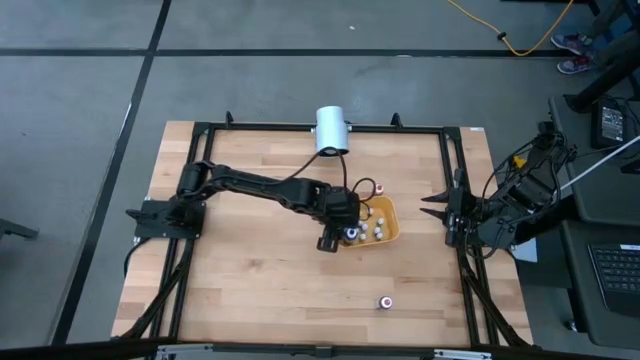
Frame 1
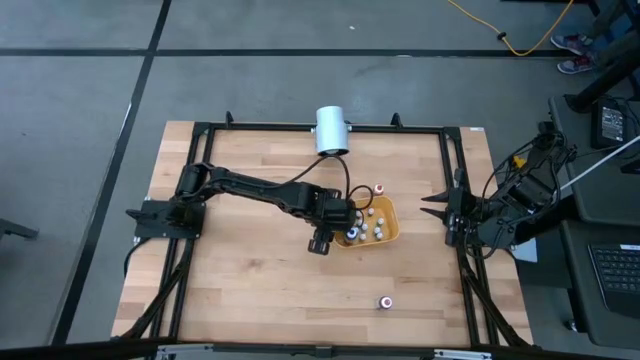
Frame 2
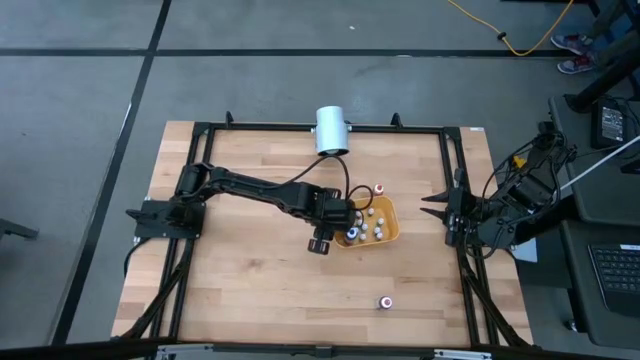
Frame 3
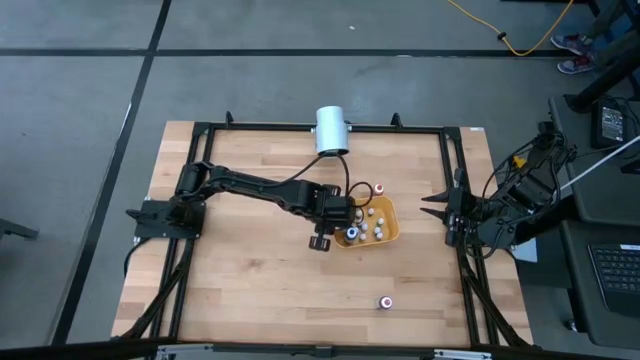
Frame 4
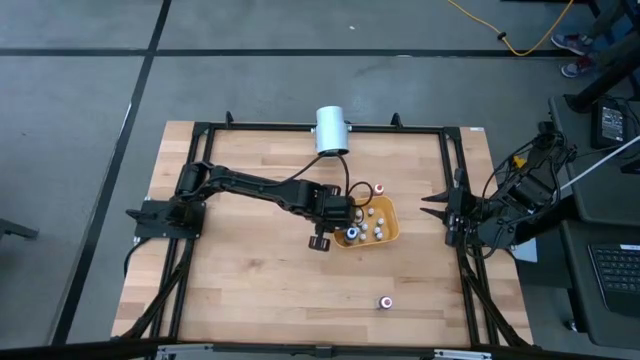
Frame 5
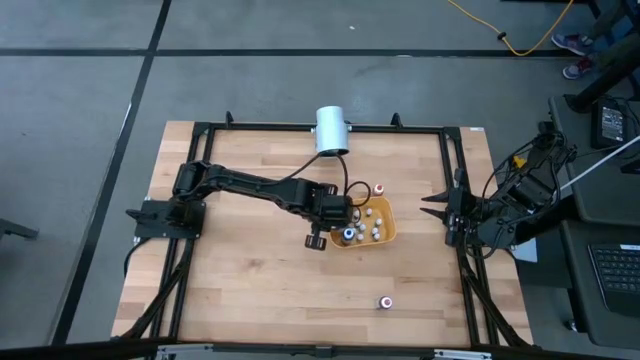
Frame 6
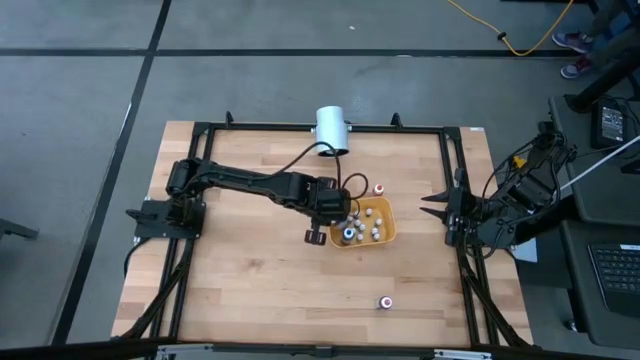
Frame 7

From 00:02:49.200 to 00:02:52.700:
Task: Pick & Place food coloring
Adjust the large purple food coloring bottle in the yellow bin

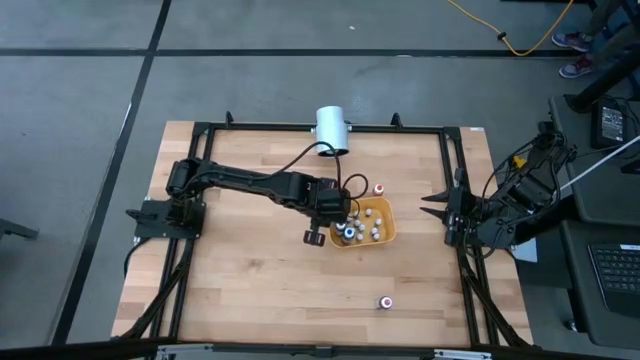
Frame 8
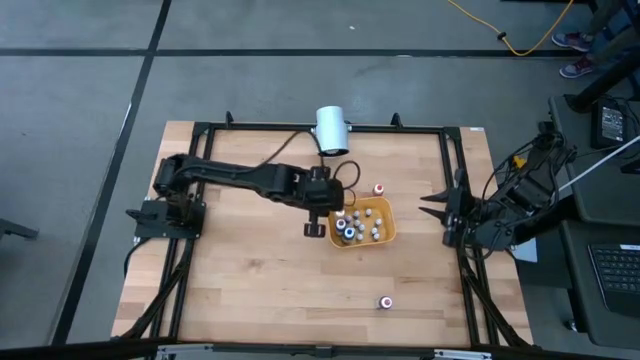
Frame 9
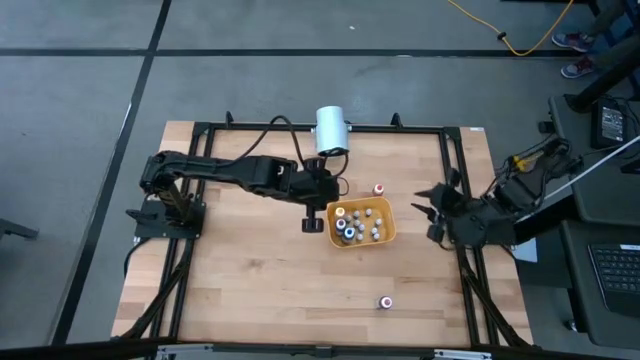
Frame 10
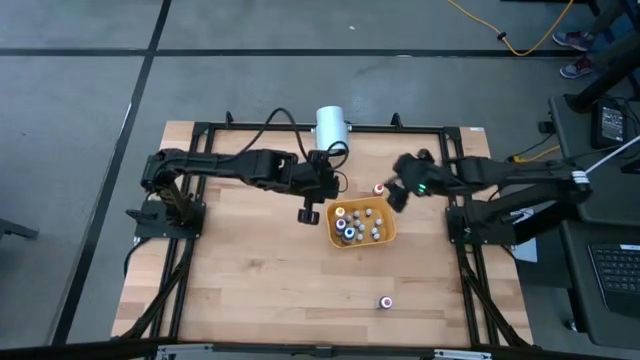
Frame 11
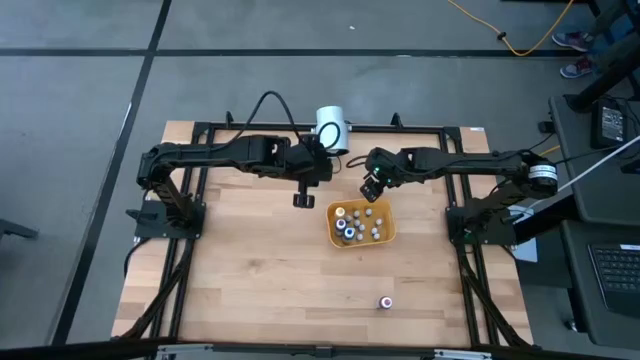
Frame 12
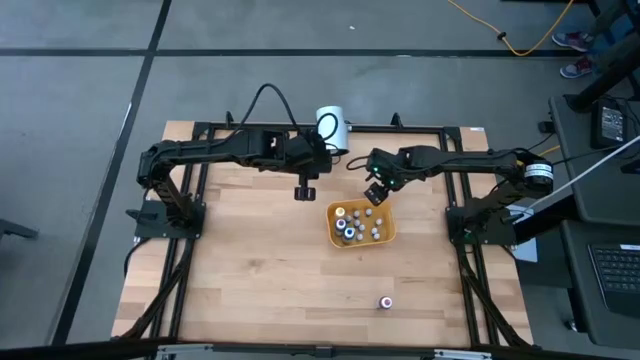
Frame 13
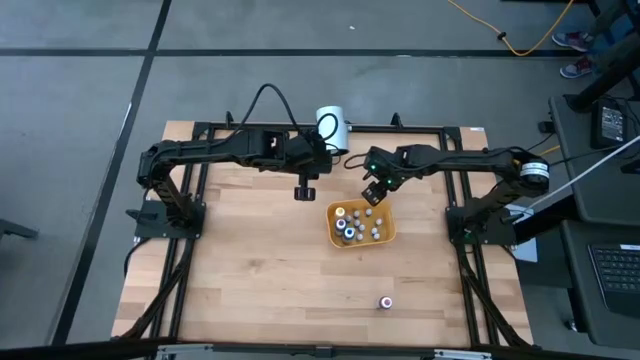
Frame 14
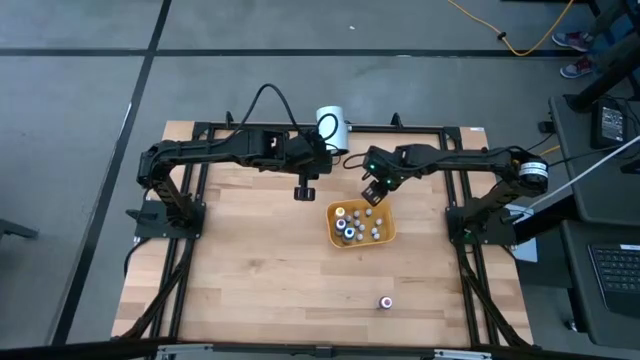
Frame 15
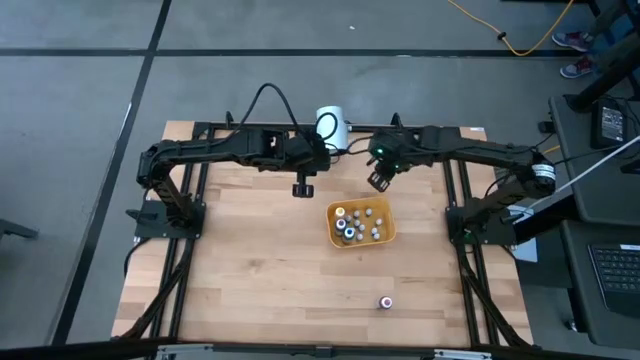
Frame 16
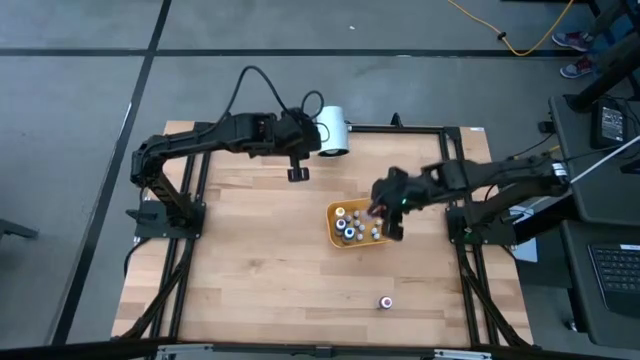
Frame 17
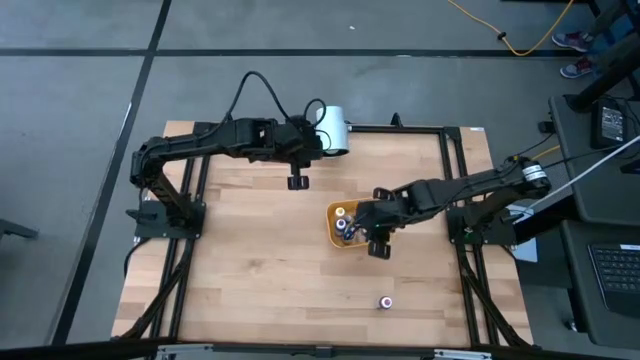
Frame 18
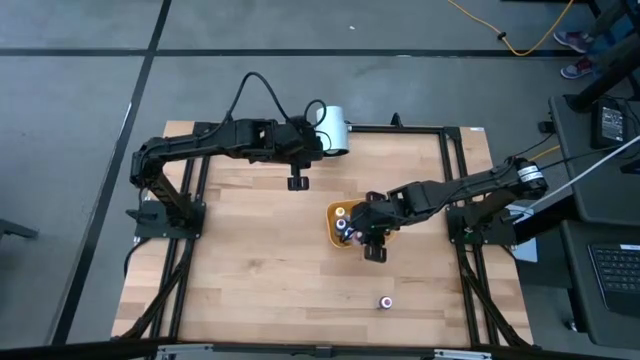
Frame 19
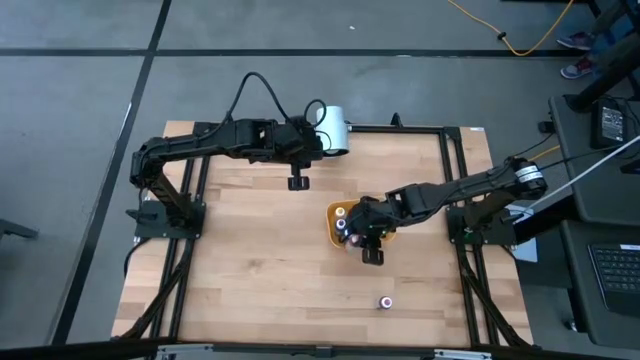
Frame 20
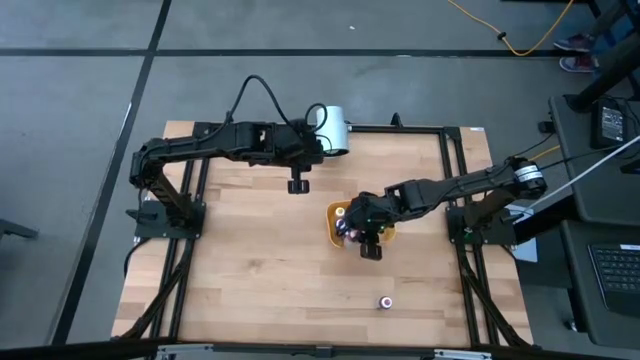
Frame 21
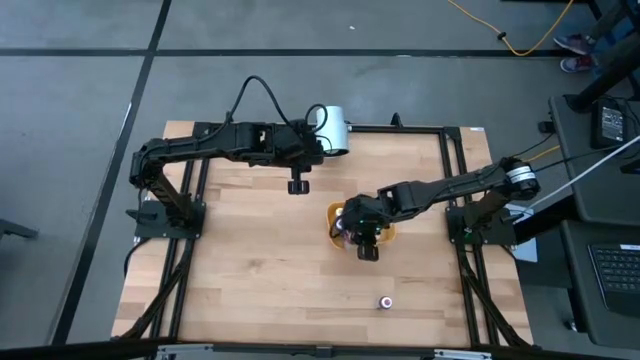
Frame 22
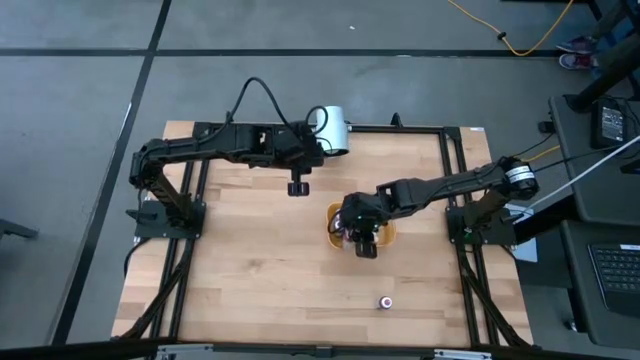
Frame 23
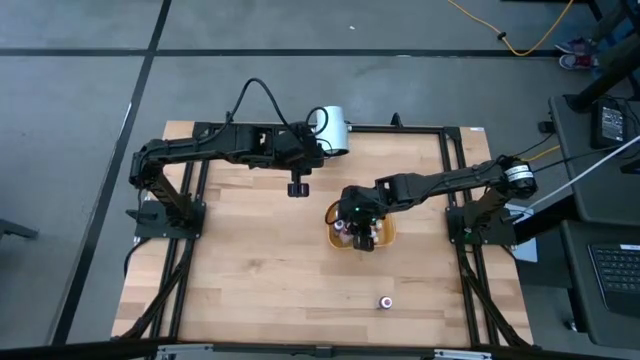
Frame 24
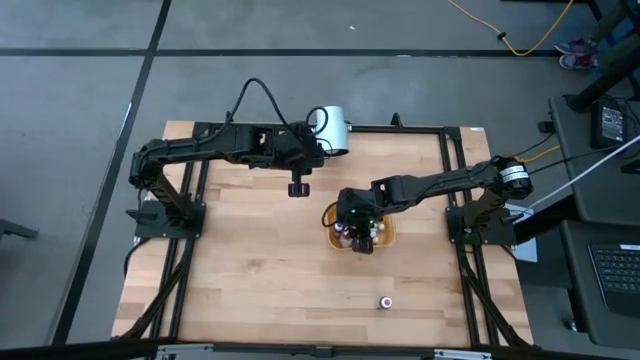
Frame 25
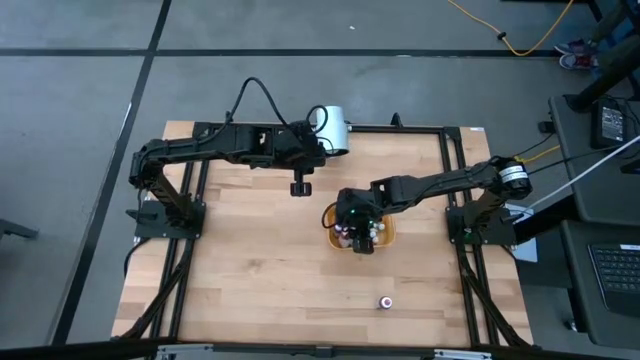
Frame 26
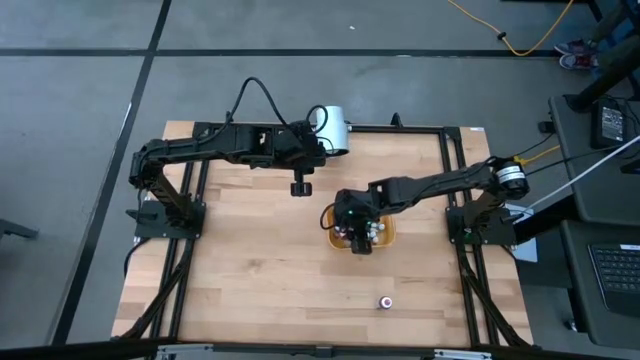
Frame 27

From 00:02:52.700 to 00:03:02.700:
Put the large orange food coloring bottle into the yellow bin

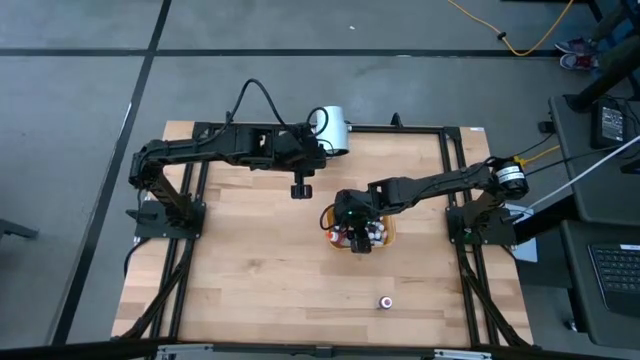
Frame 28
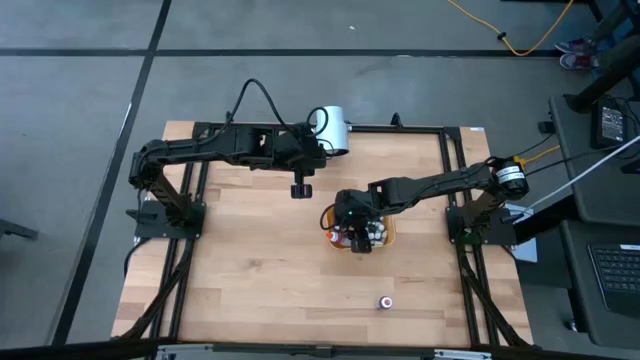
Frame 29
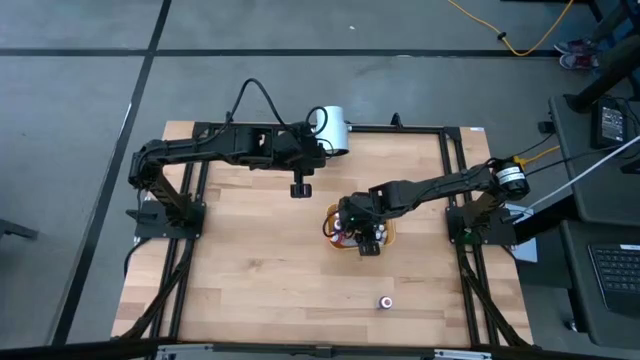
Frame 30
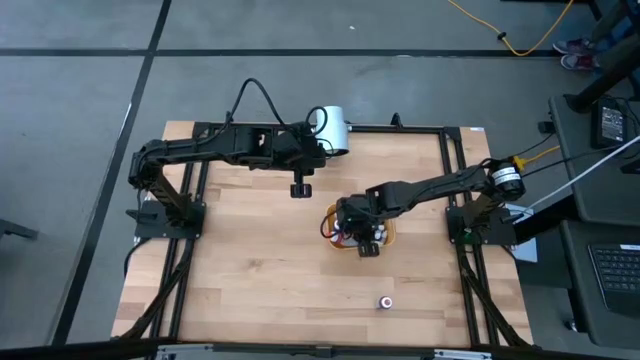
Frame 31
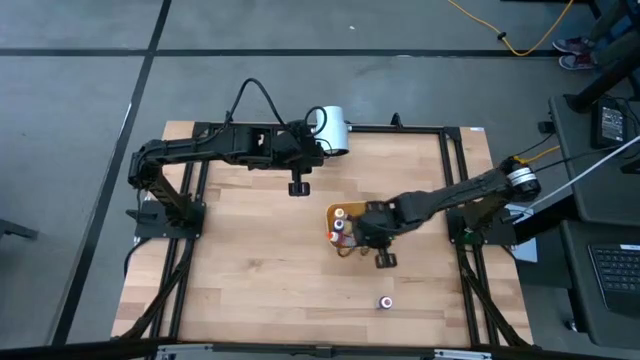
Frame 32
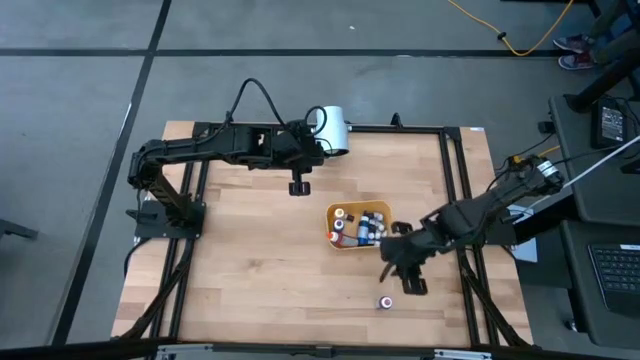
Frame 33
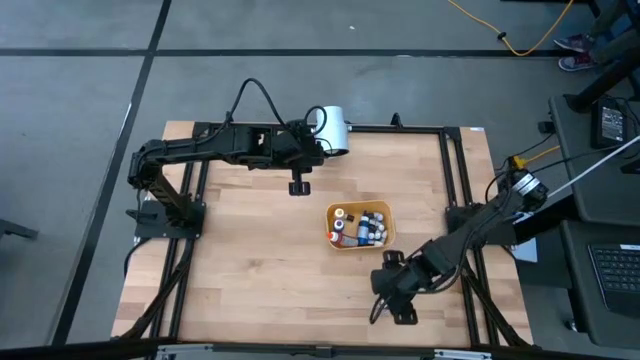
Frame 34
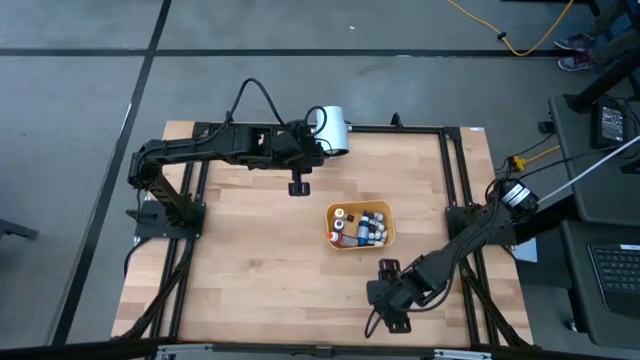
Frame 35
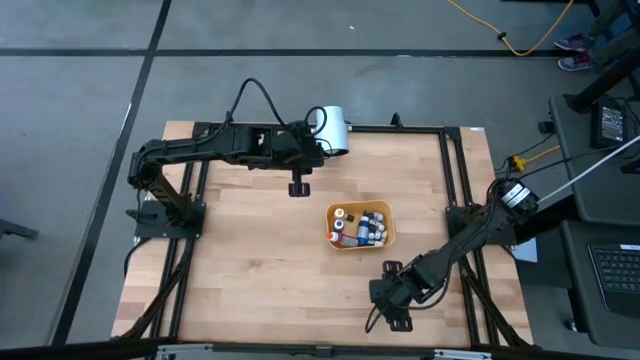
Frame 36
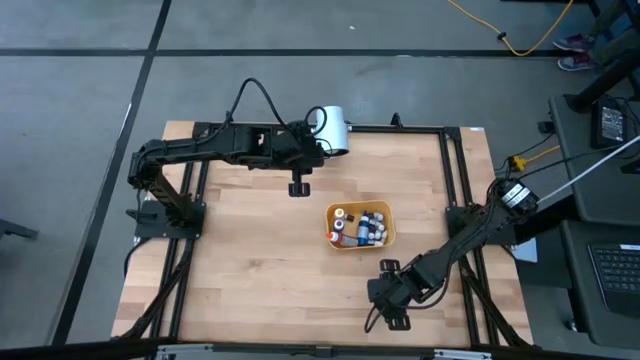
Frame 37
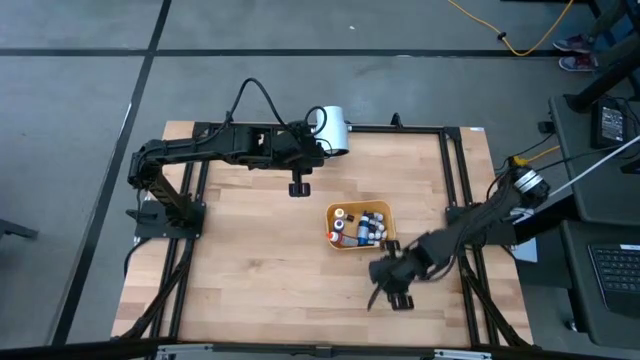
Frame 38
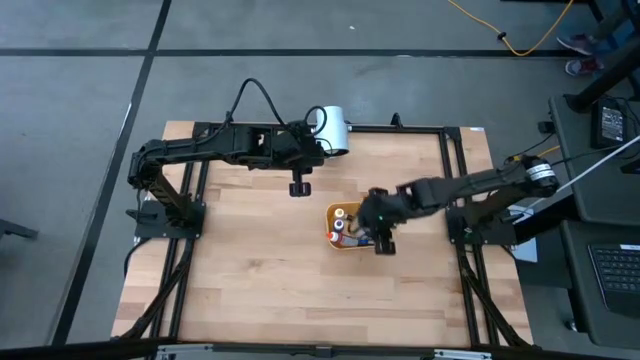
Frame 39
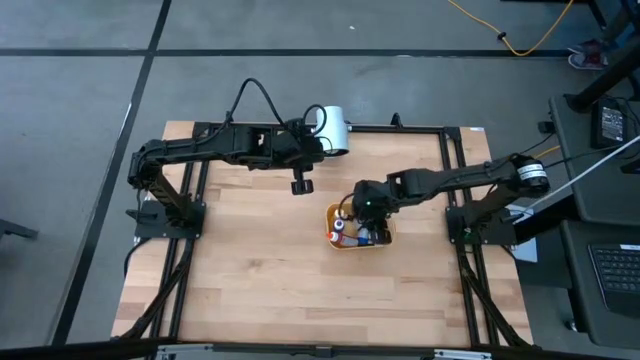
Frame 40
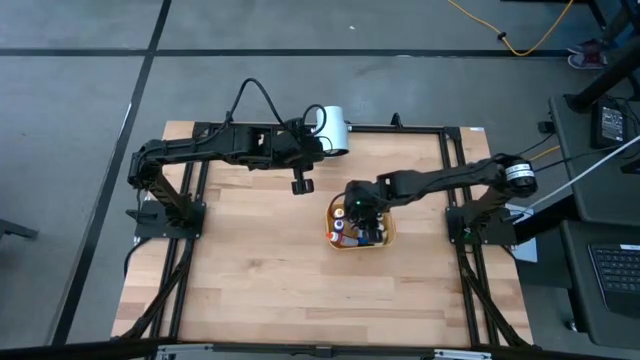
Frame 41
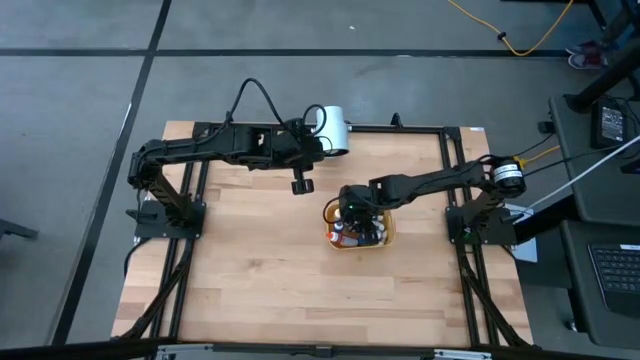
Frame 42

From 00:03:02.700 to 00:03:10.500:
Put the large pink food coloring bottle into the yellow bin

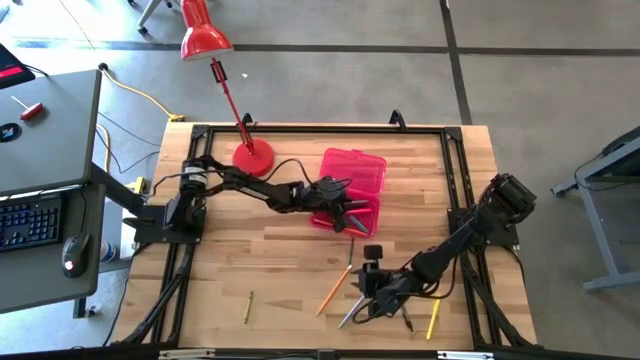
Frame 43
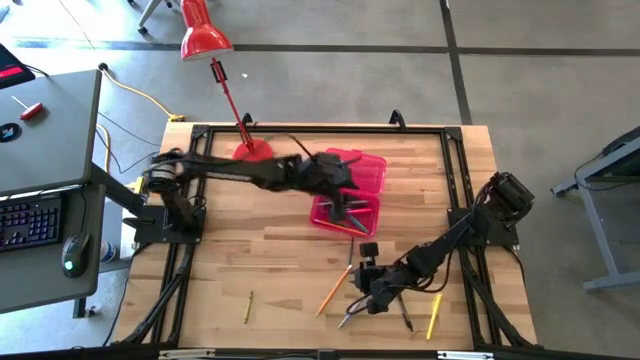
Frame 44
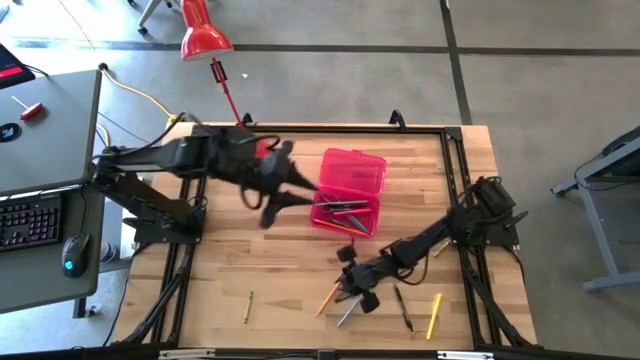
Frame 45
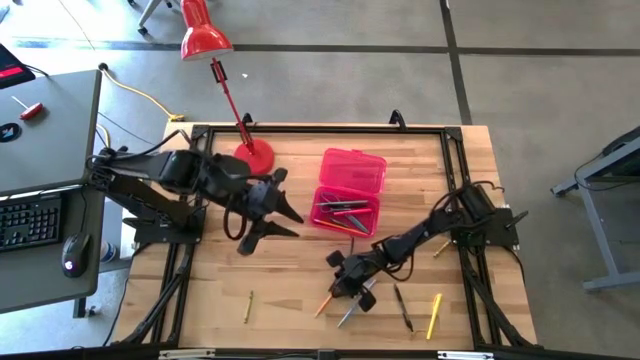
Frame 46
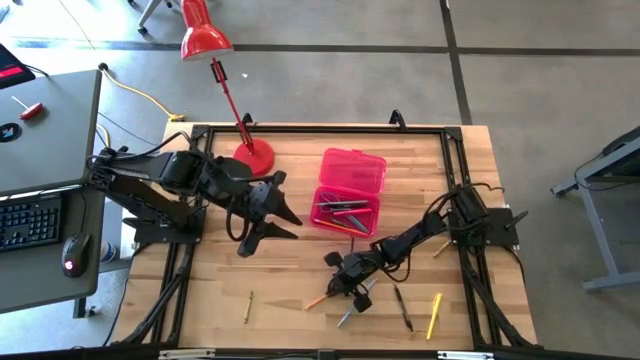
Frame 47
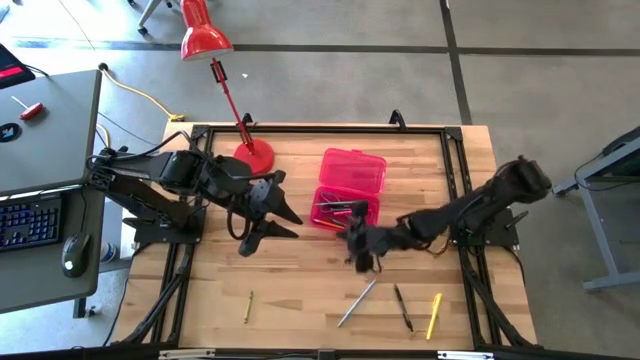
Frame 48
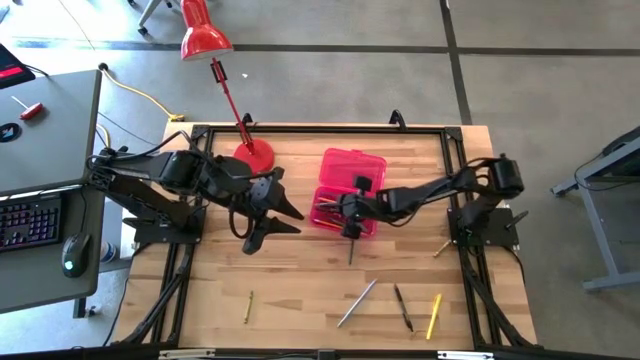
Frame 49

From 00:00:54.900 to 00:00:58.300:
Task: Pick & place school supplies into a supply box
Put the orange pencil into the red supply box
